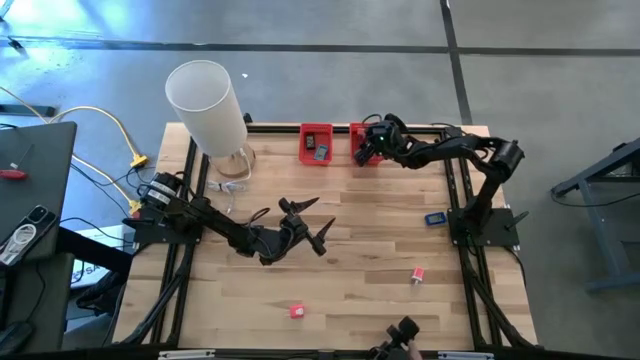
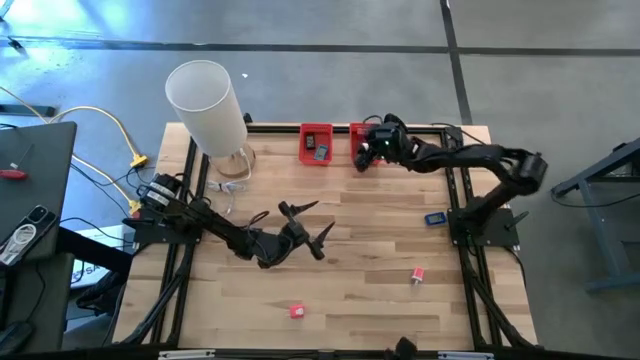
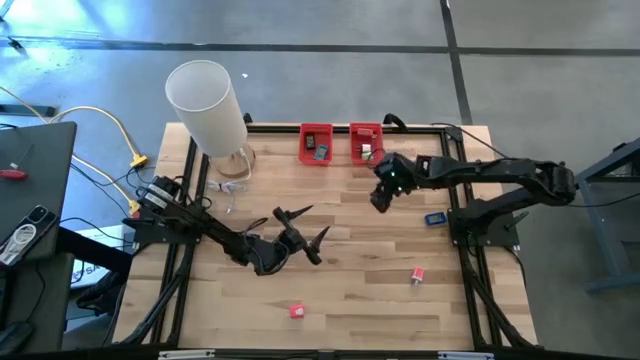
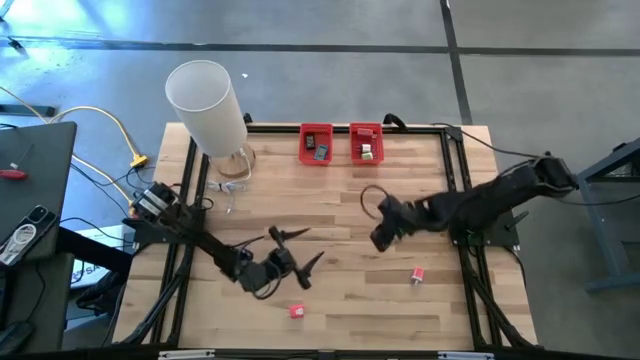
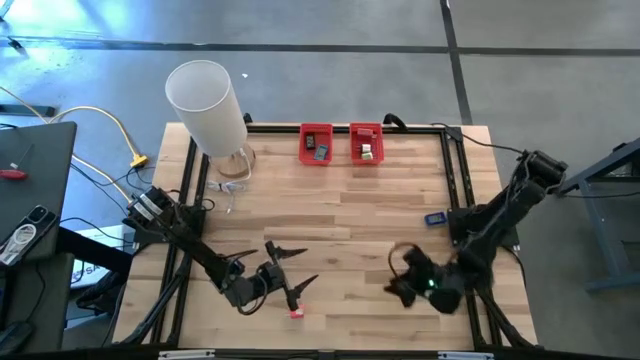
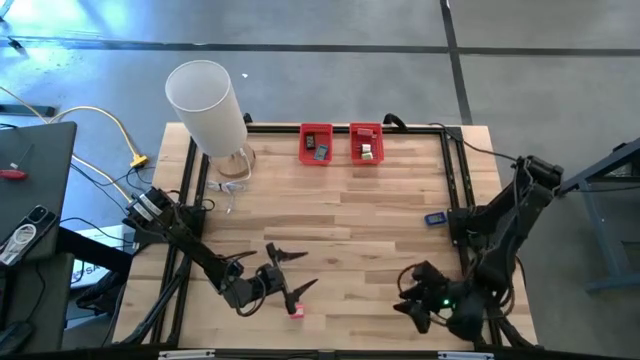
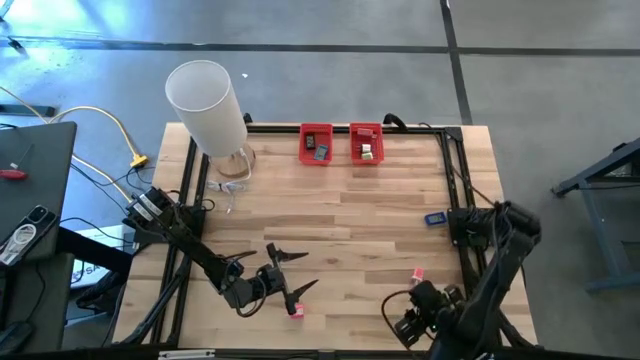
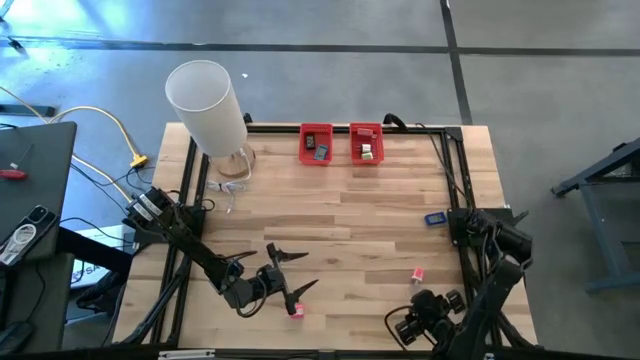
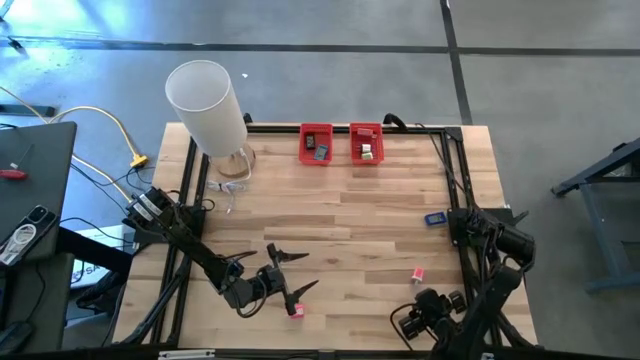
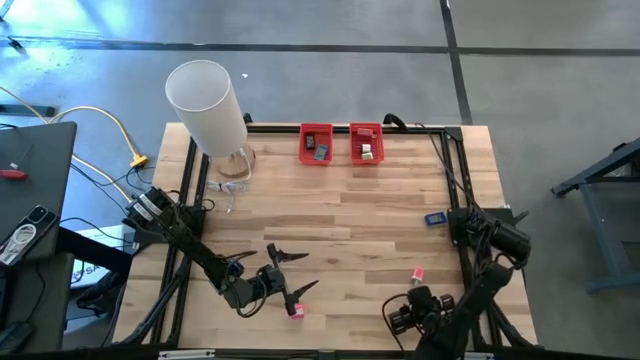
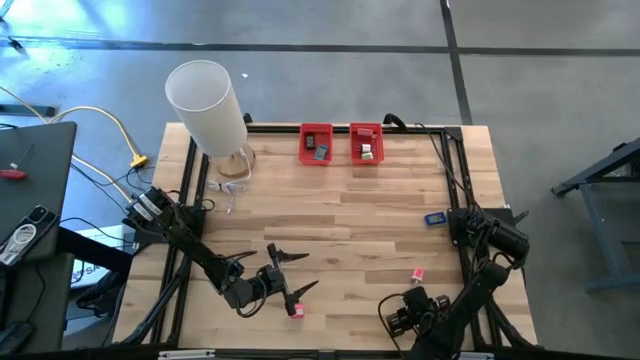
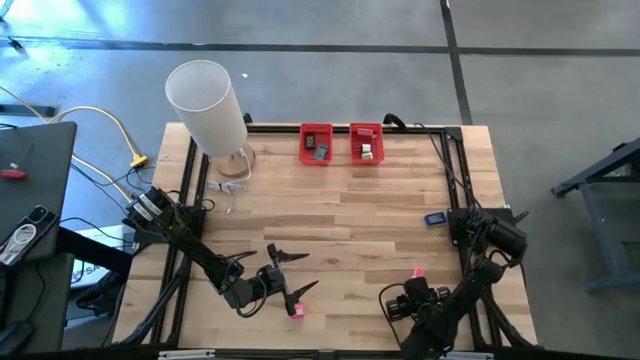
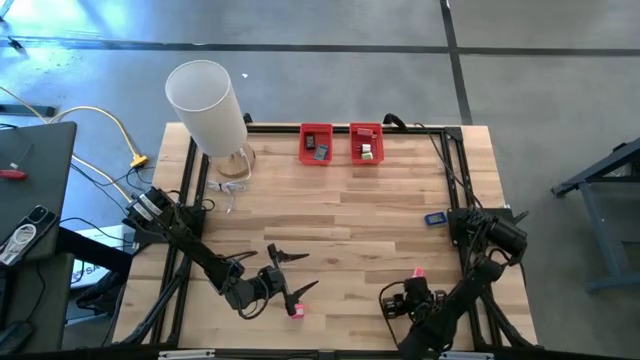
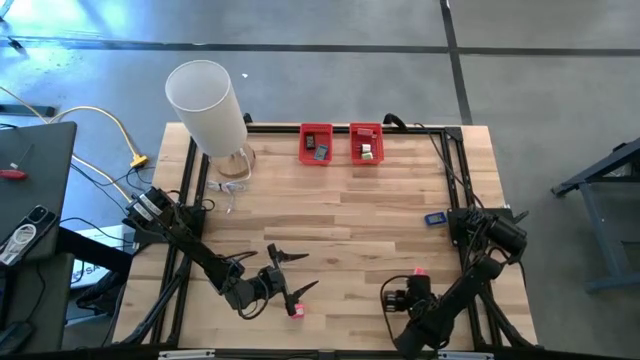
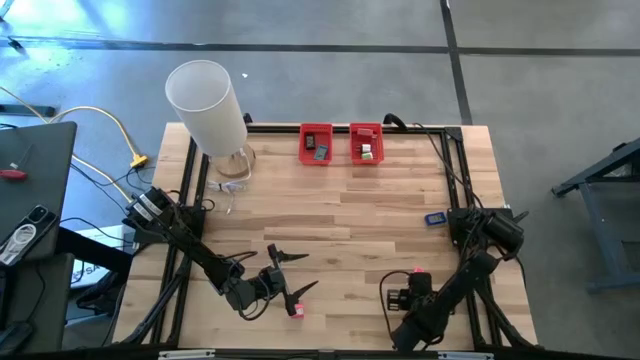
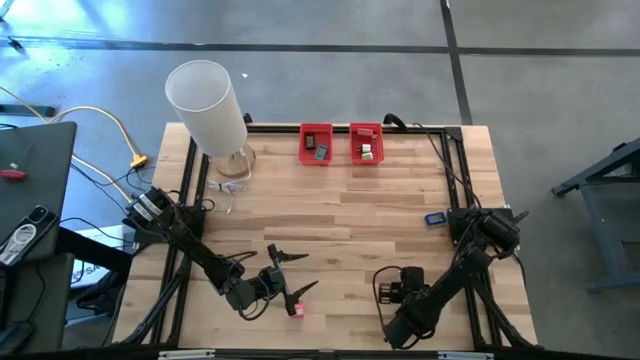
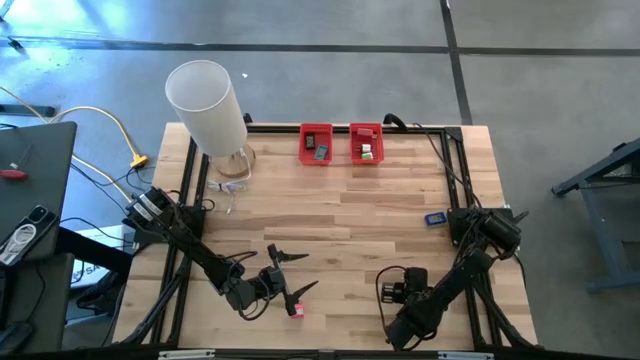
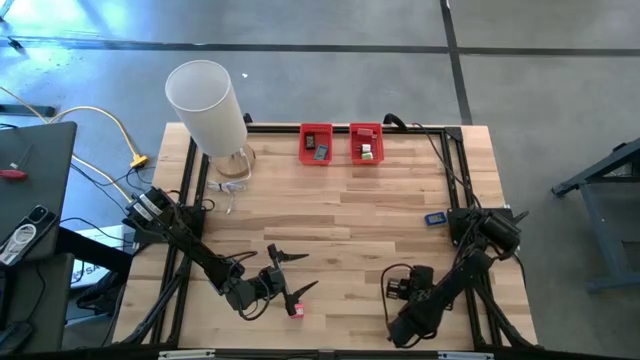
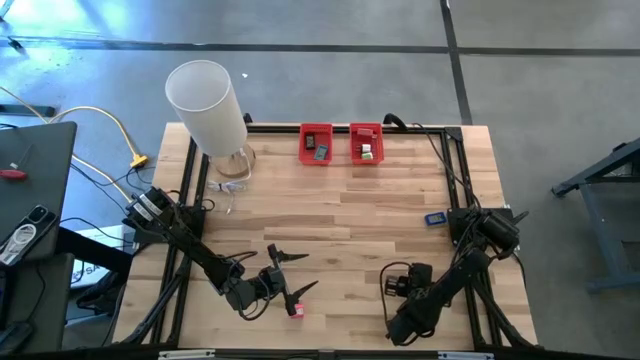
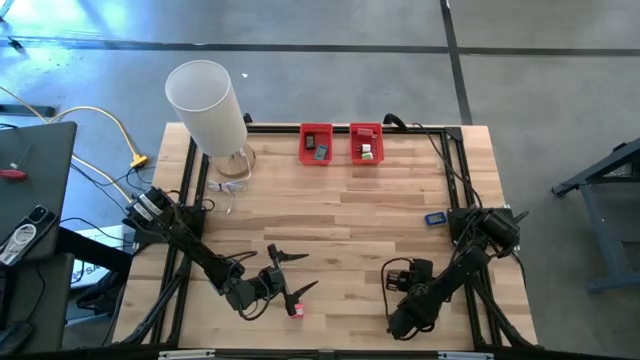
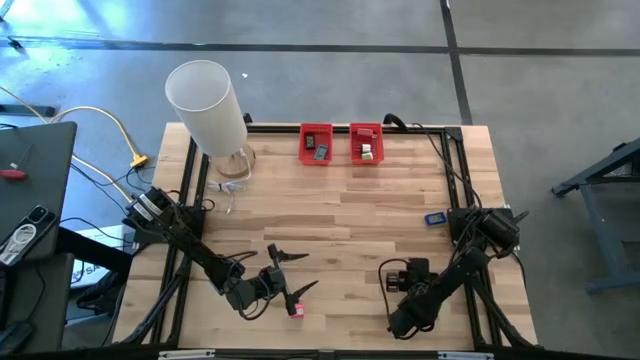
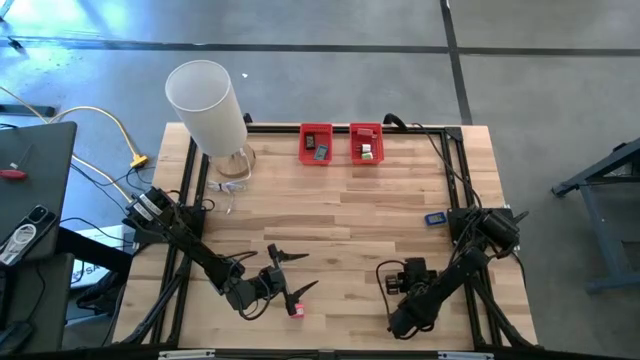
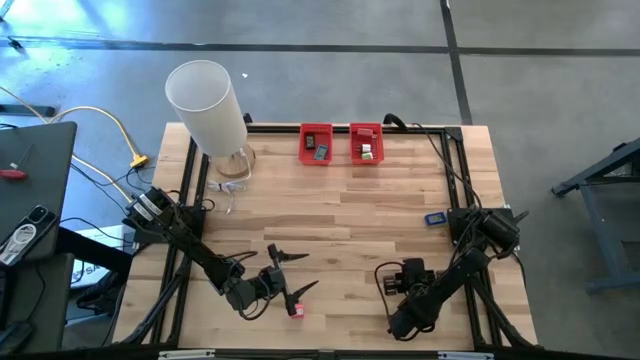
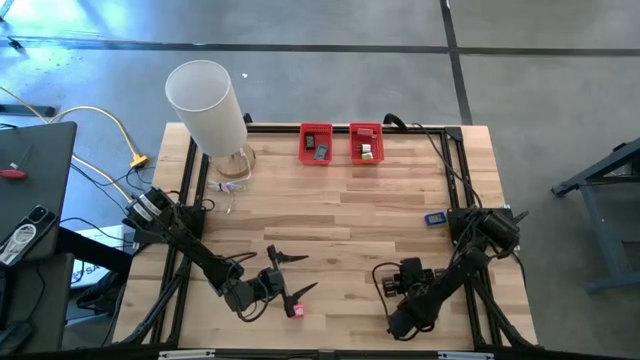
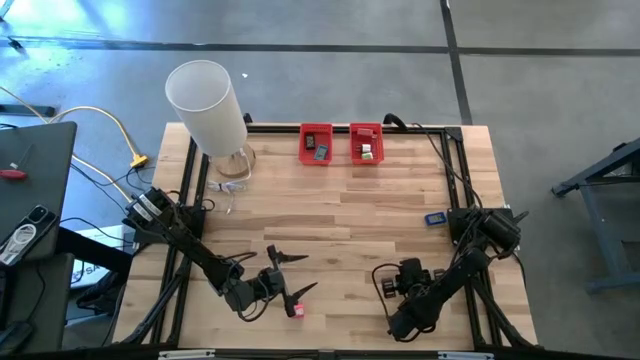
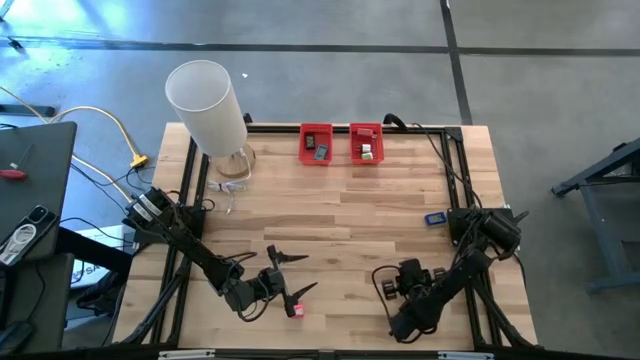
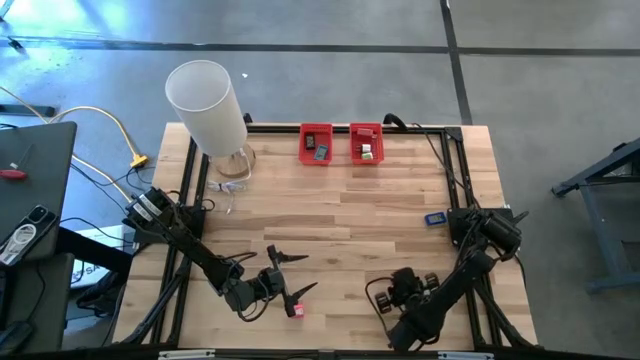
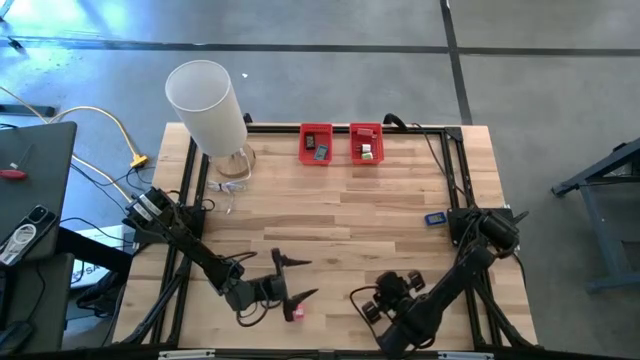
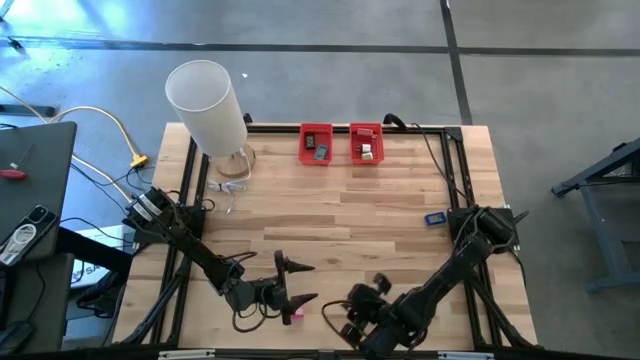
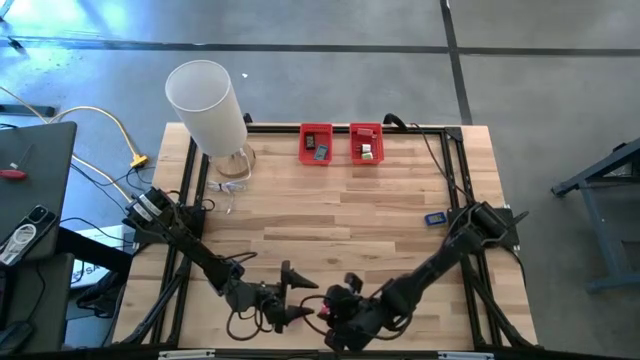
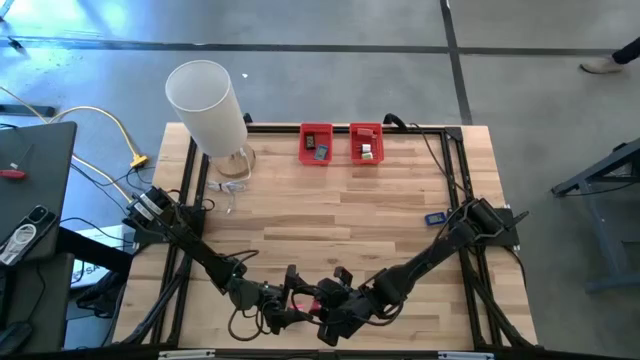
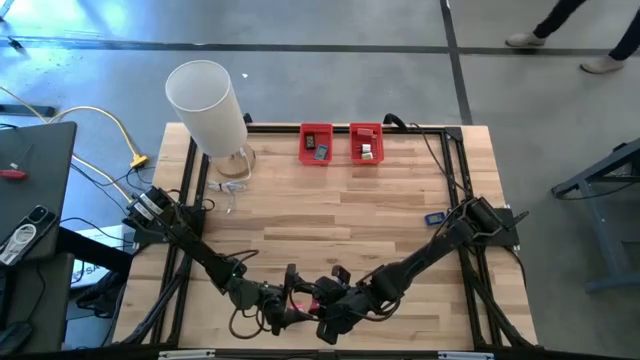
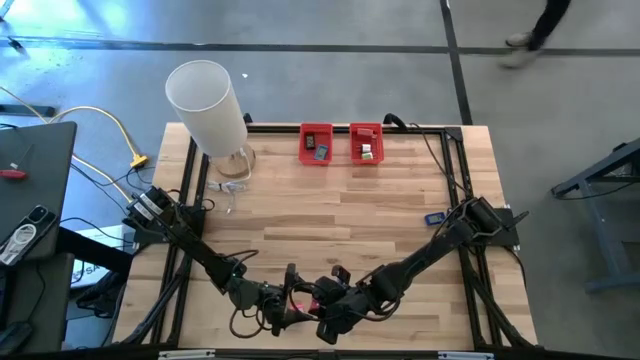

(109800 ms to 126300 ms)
Task: Pick & Place Office items
Put the pink white charger adapter into the right red bin

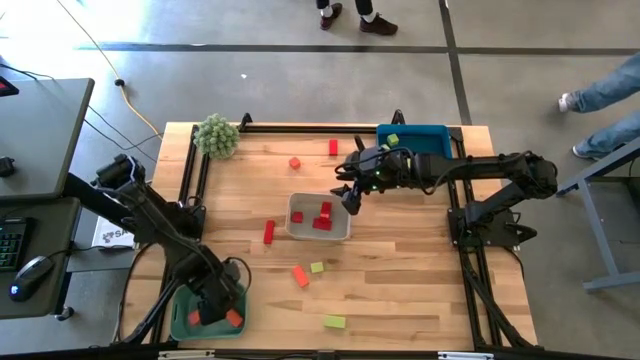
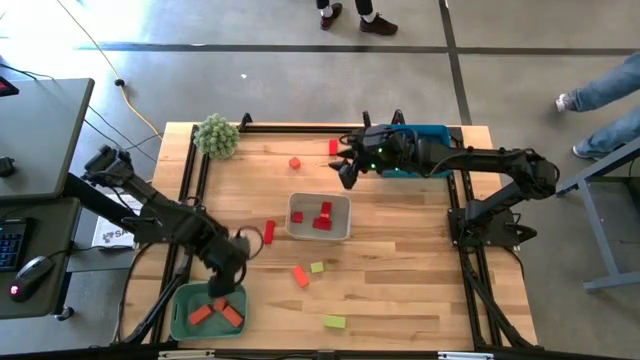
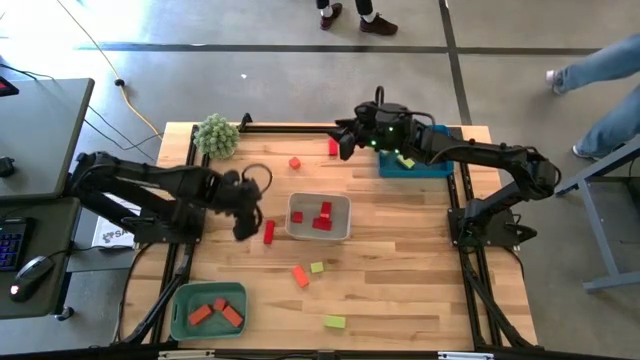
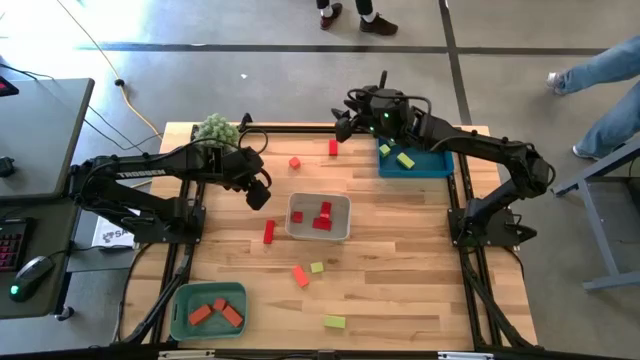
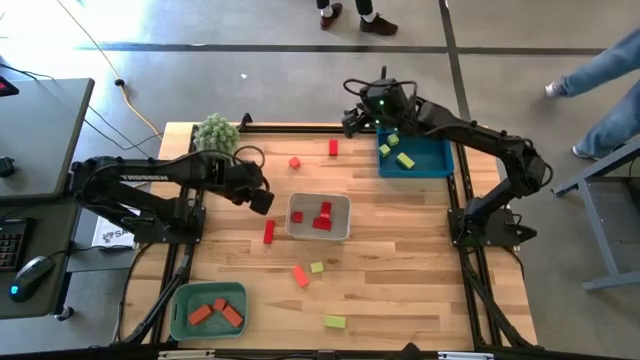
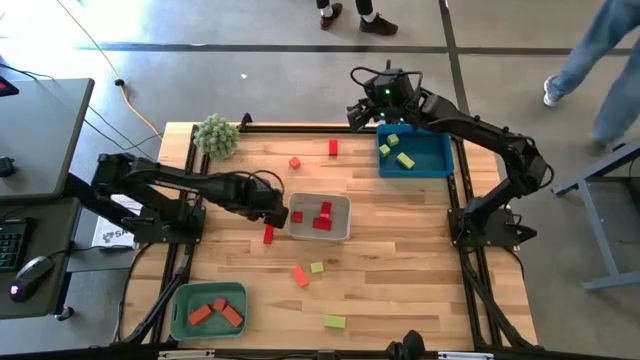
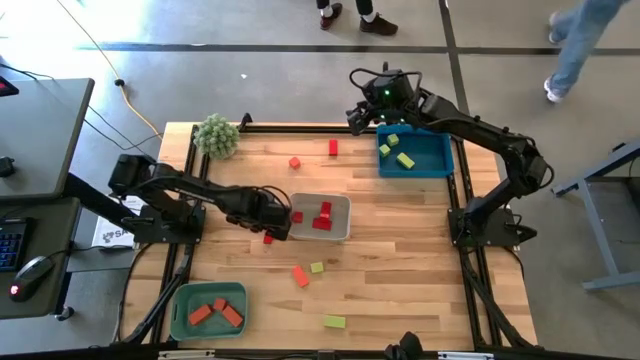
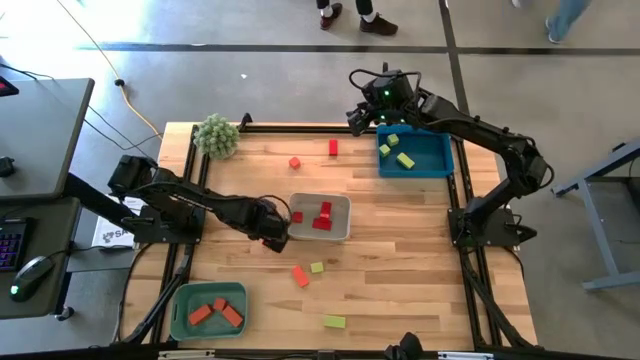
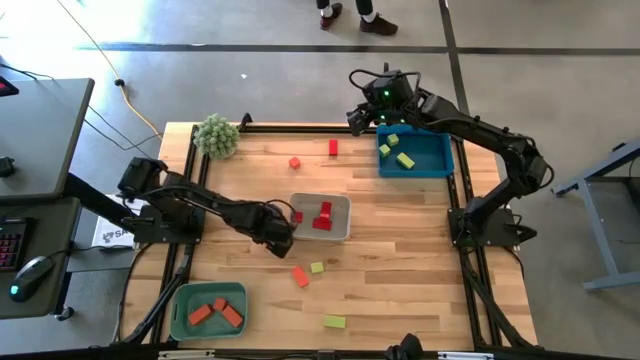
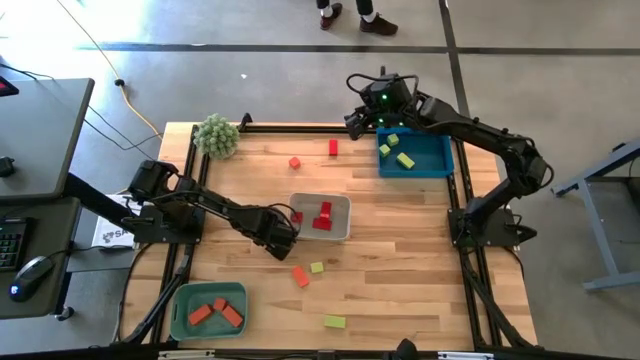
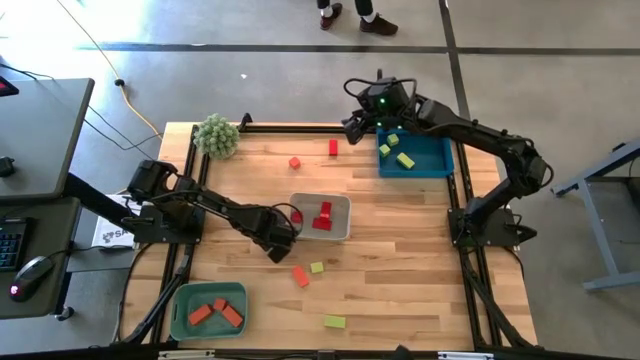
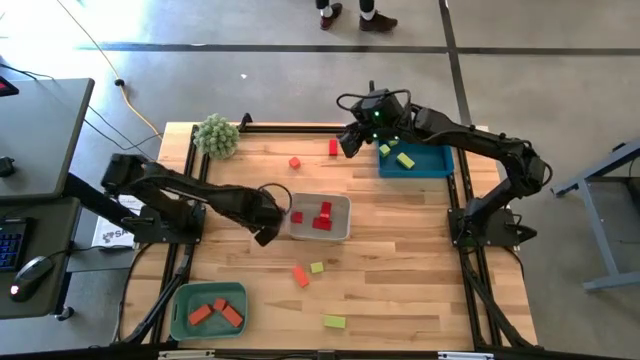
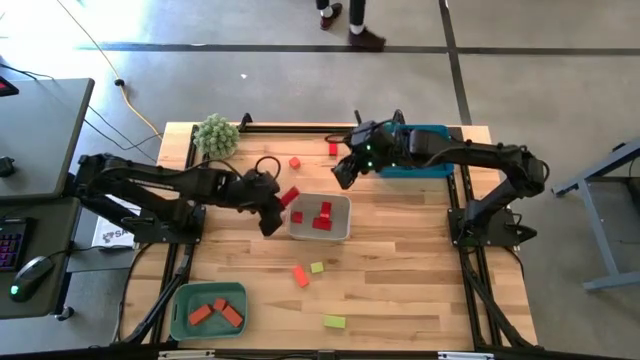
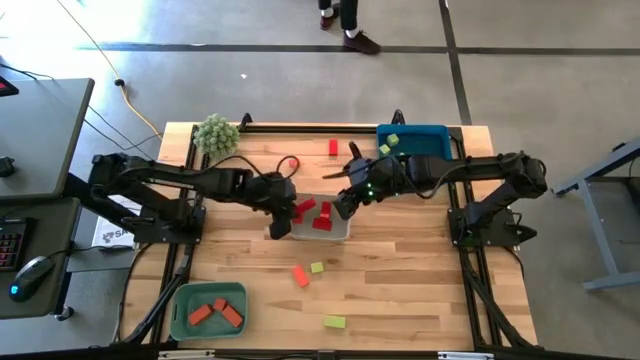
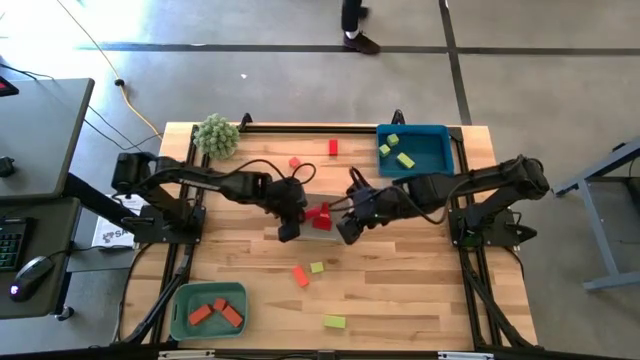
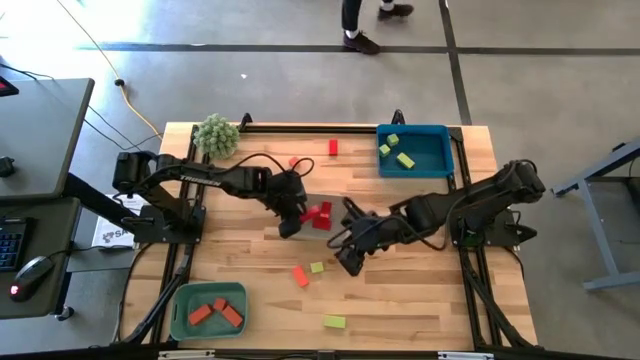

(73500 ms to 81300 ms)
Task: Sort & place blocks by color
Put the red wooden block into the white bin
